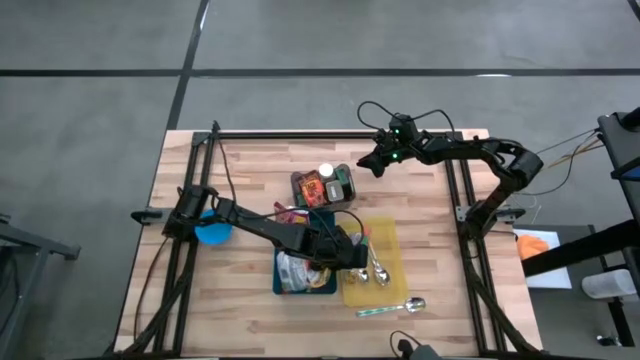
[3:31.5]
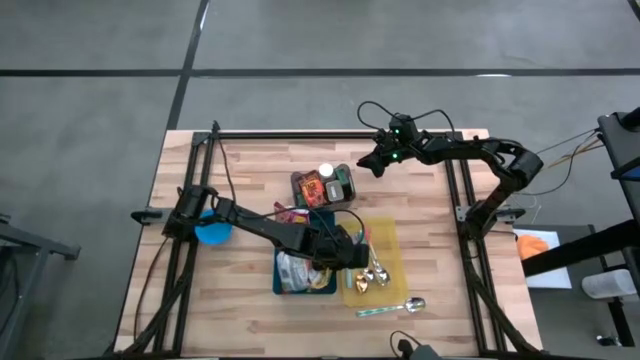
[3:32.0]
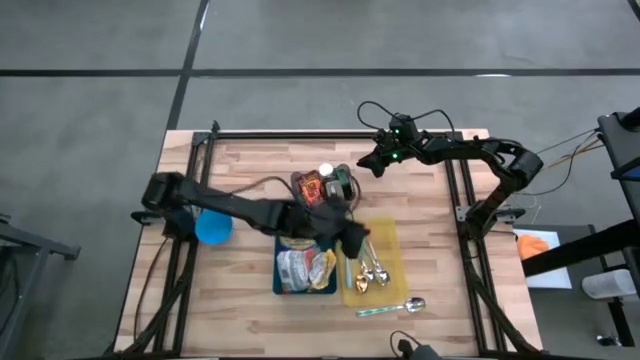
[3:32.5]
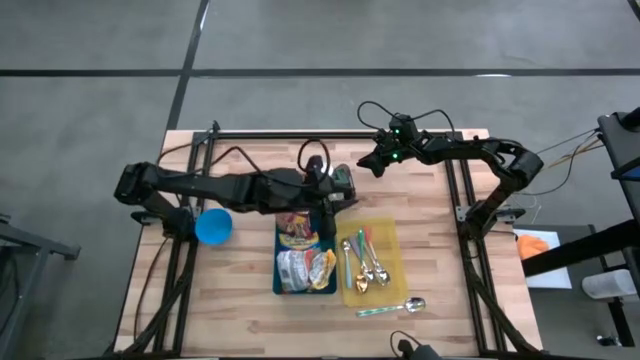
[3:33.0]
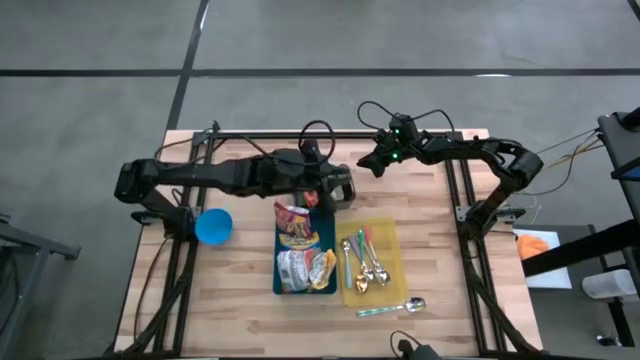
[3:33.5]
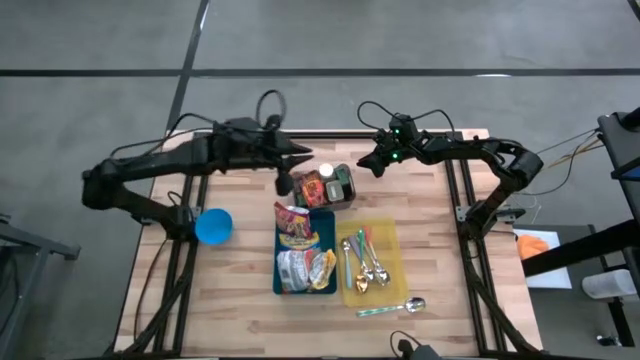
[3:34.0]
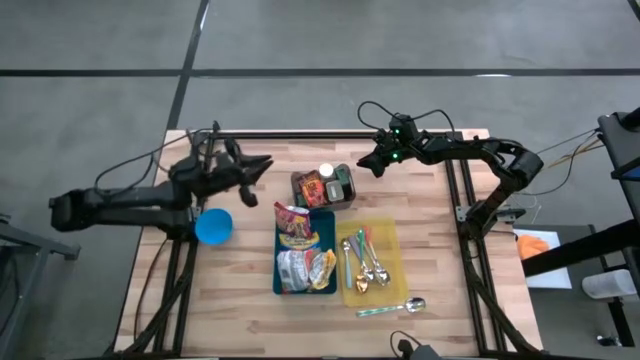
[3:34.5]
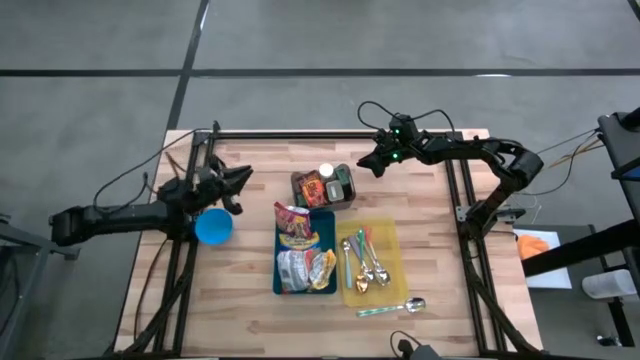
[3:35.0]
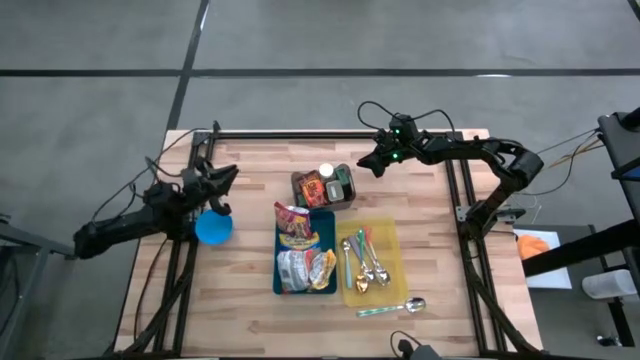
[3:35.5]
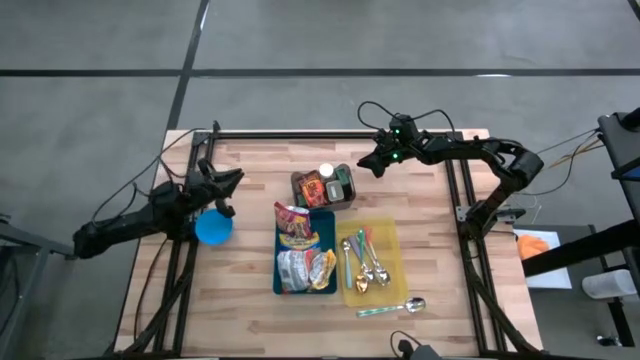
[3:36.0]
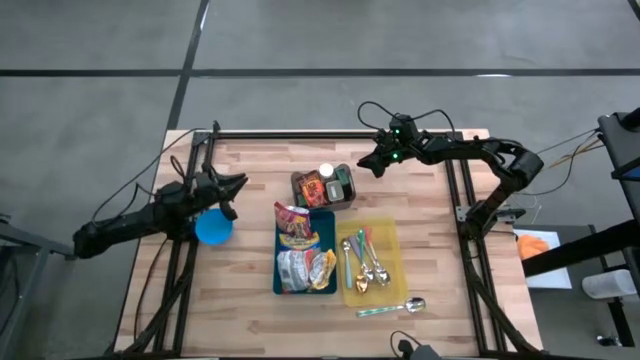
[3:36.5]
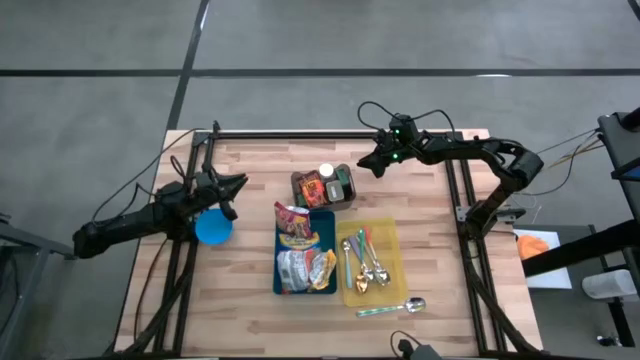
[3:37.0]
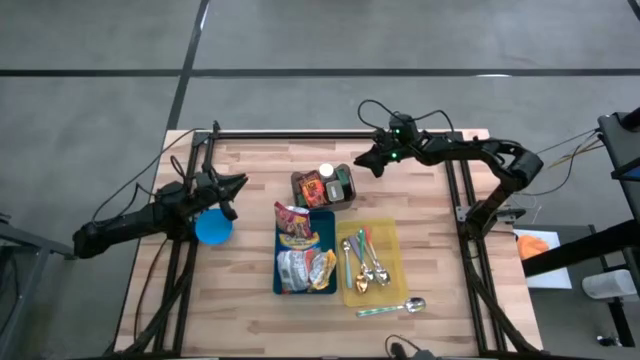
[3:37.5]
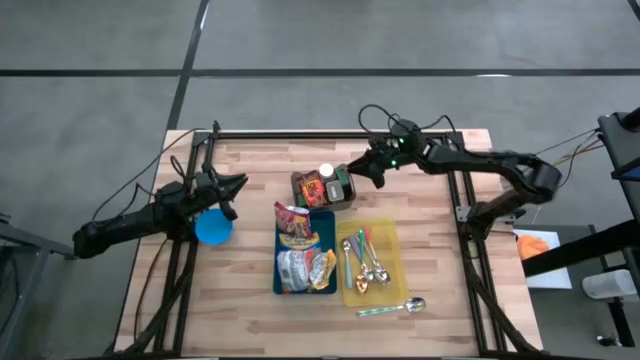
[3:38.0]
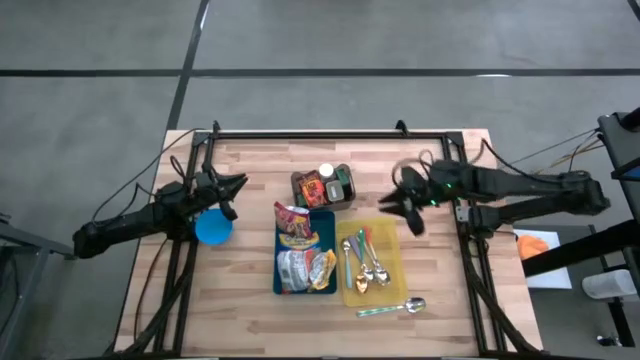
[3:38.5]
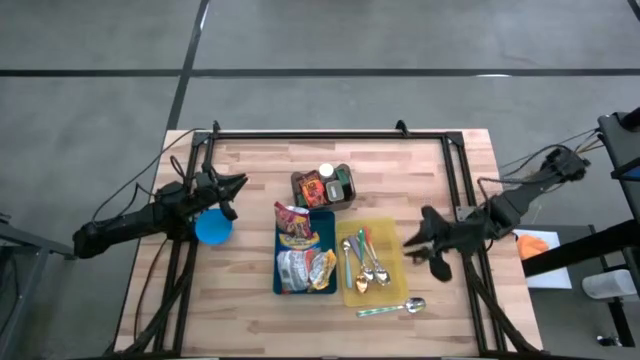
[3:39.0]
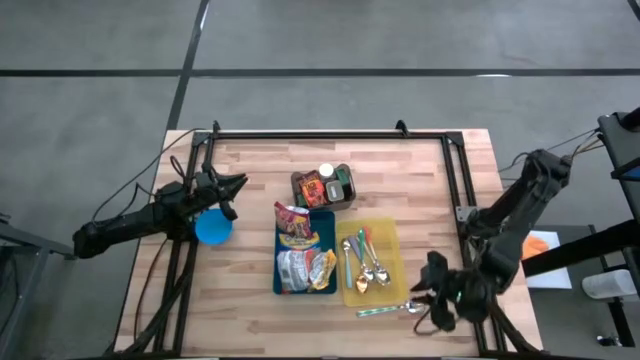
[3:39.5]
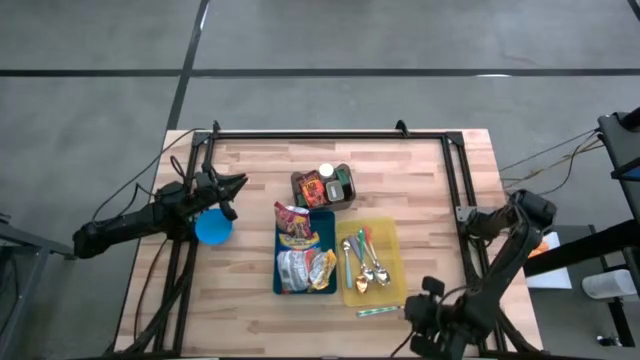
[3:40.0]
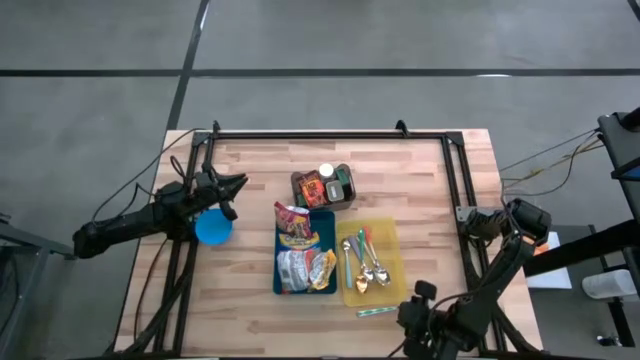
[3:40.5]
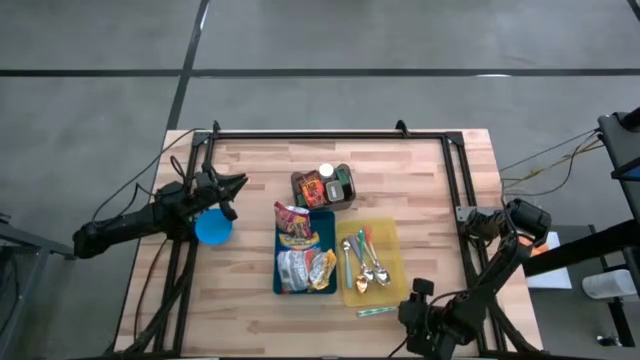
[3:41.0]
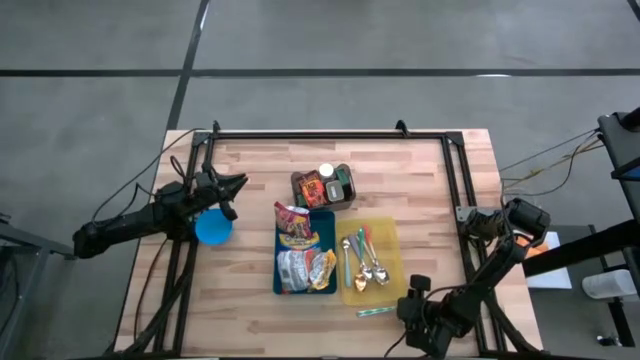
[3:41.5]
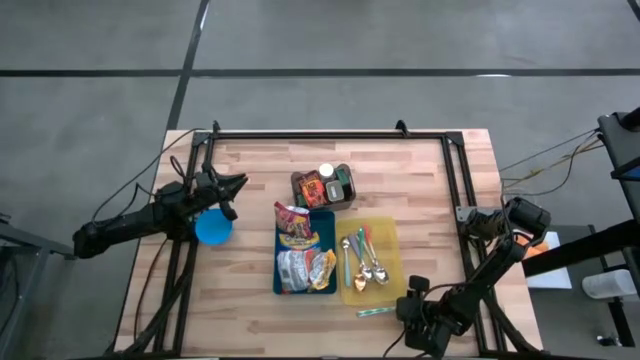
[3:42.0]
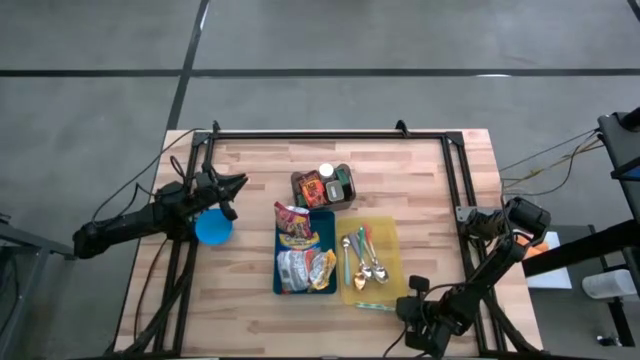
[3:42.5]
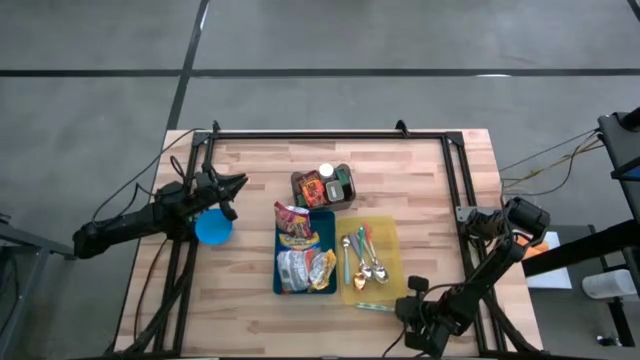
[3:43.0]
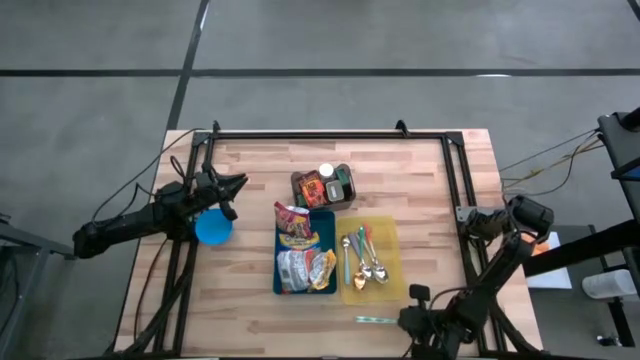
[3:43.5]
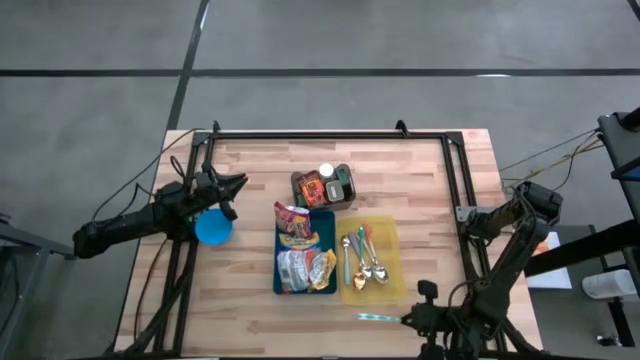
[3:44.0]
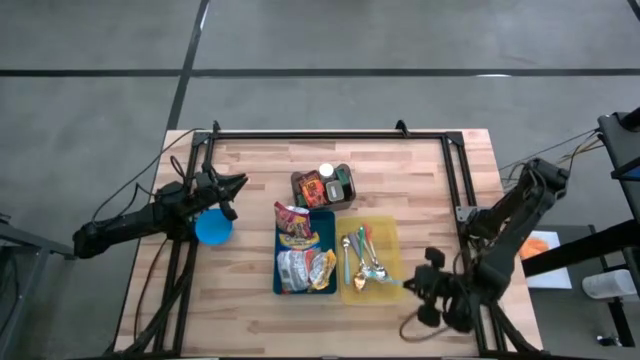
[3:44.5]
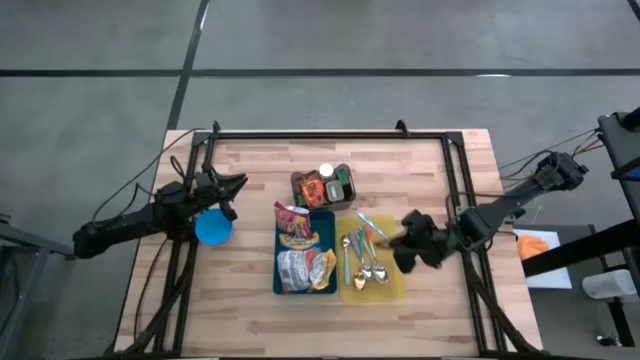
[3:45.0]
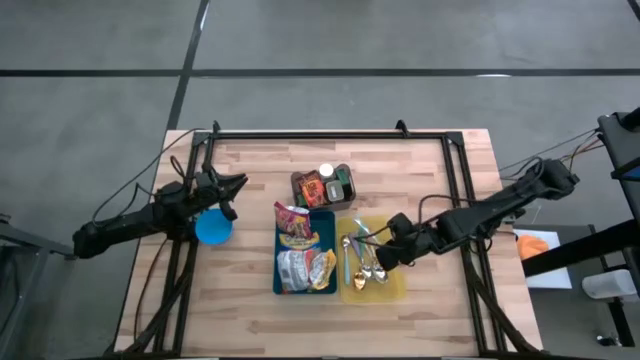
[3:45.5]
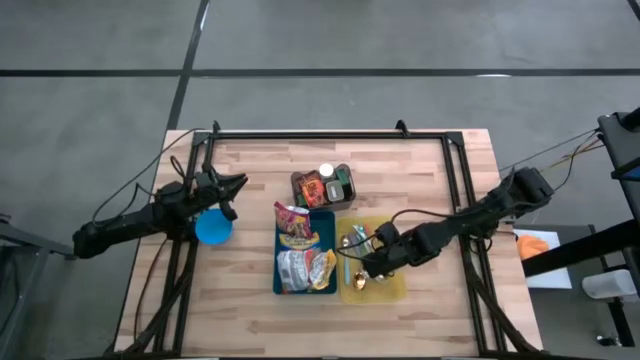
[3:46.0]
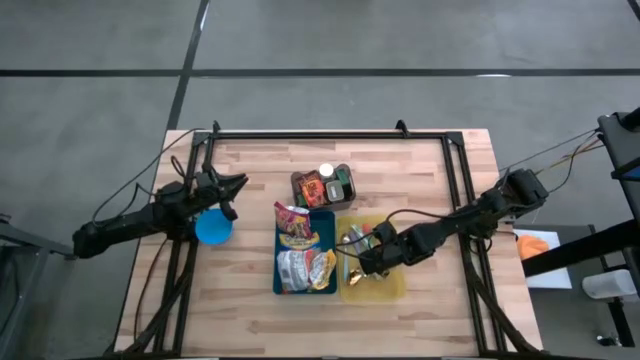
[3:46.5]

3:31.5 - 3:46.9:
Put the blue patterned spoon into the yellow bin

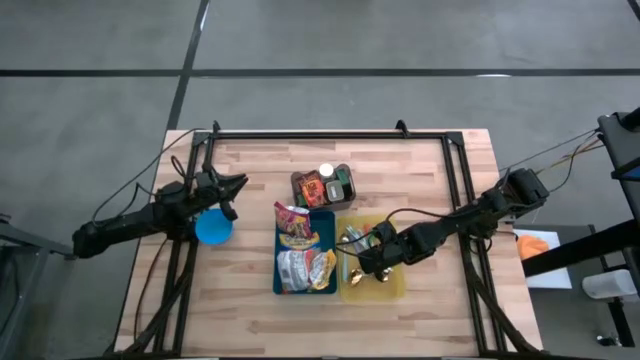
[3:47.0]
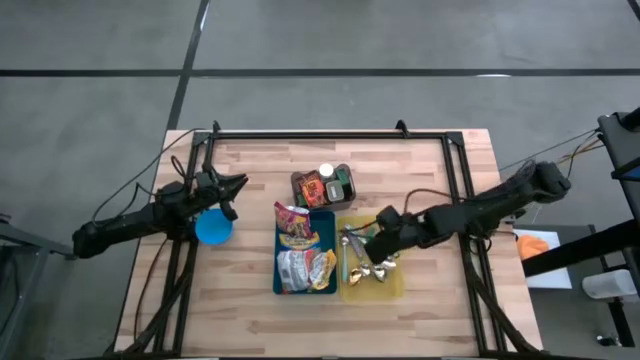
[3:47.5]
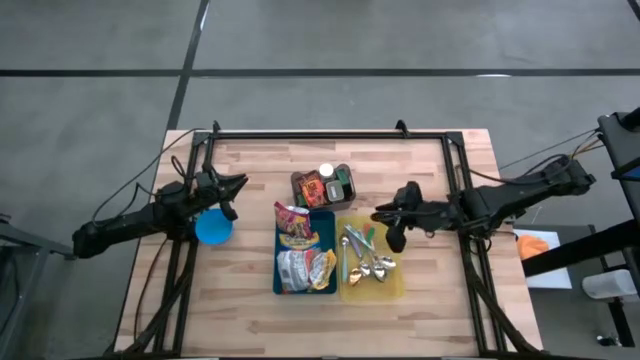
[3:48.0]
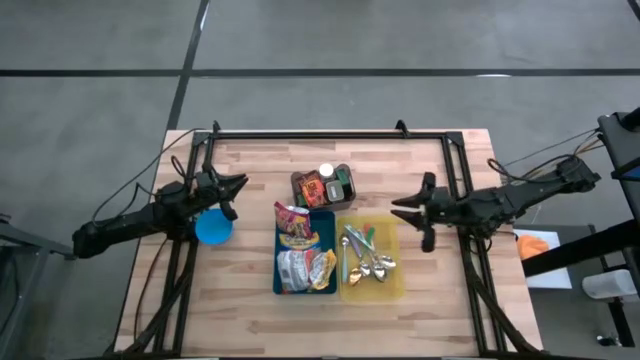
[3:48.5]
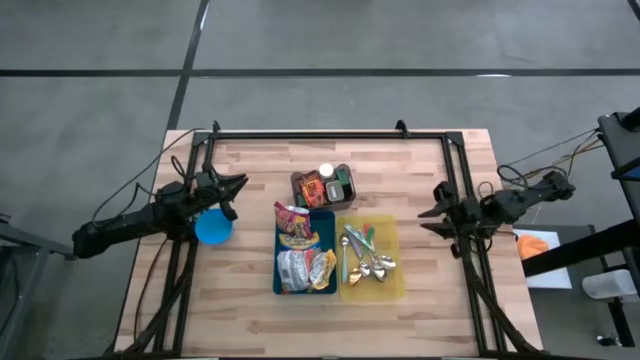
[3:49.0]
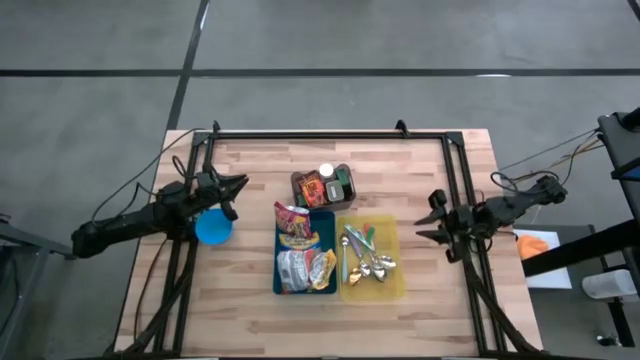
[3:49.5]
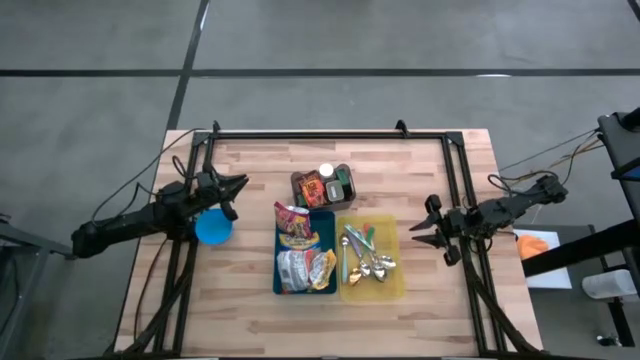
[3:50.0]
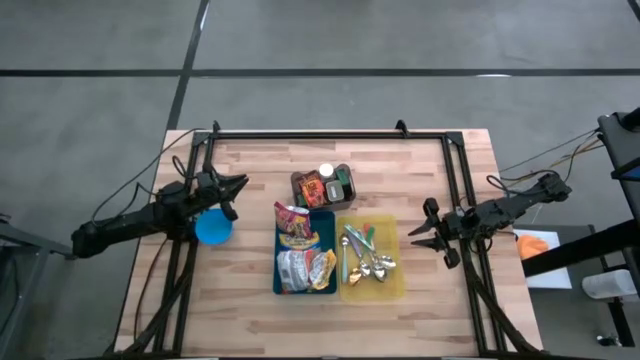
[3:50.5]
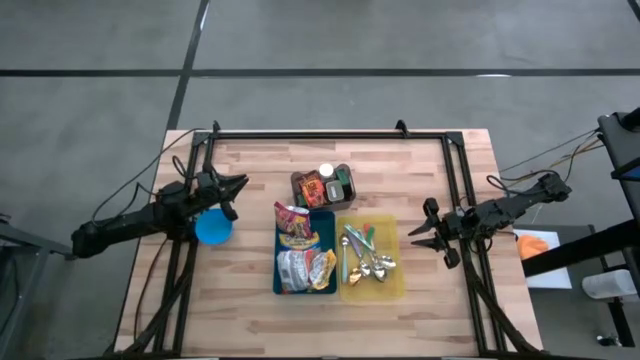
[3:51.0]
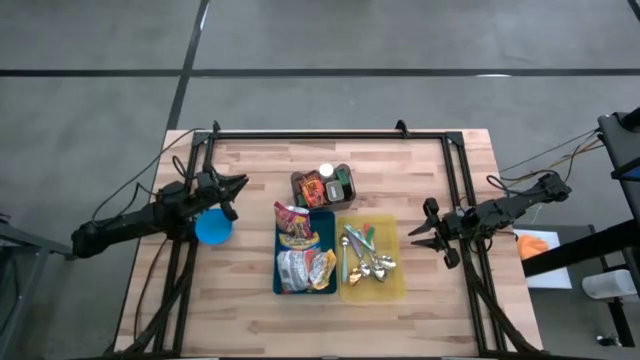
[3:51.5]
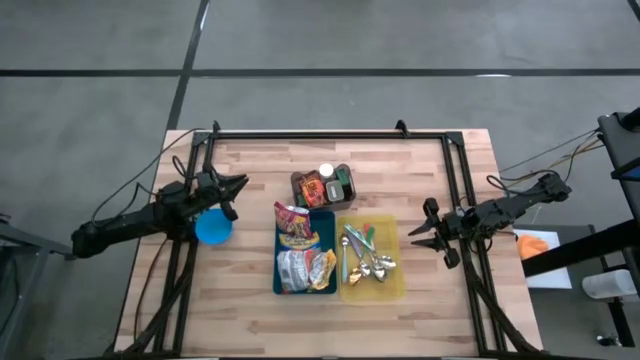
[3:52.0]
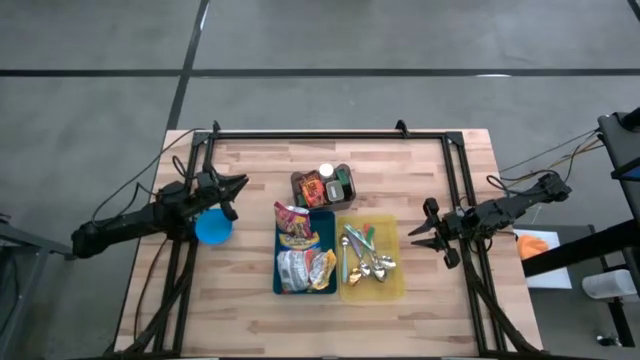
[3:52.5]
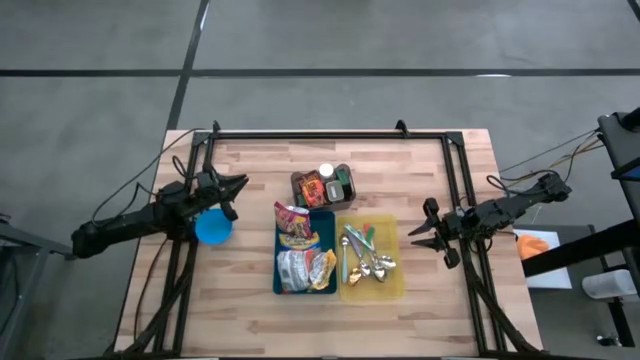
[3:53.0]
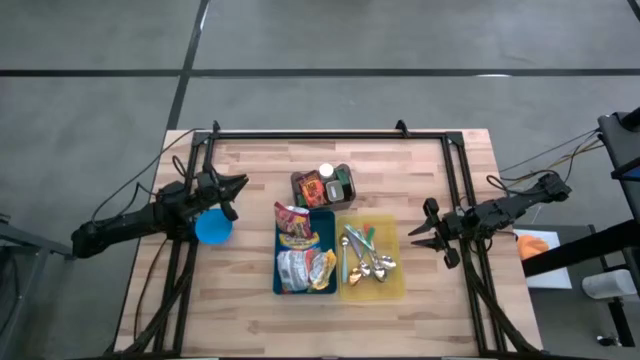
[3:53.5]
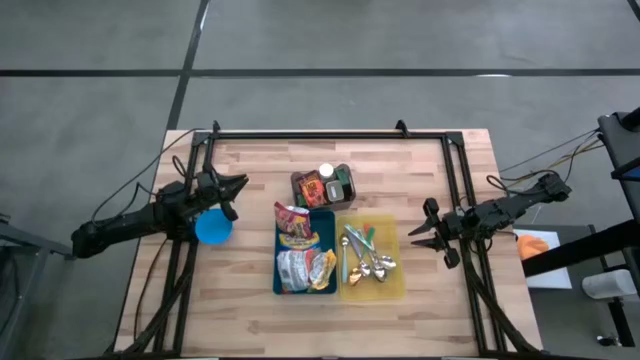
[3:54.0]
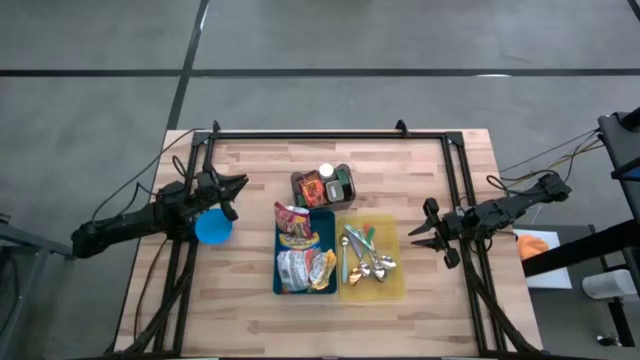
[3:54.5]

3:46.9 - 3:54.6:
Return to Home Position
